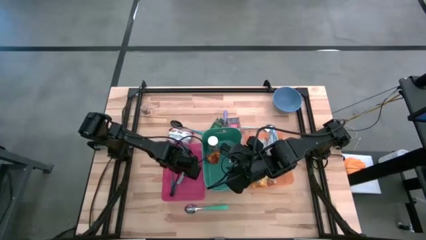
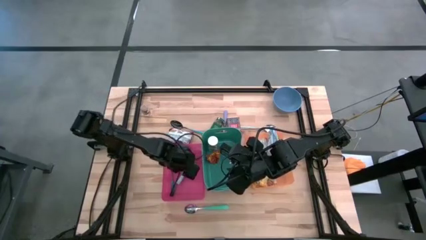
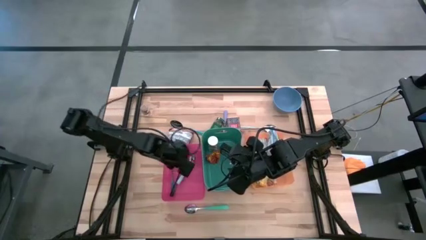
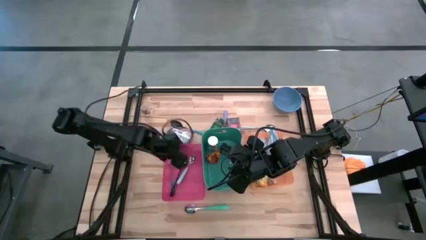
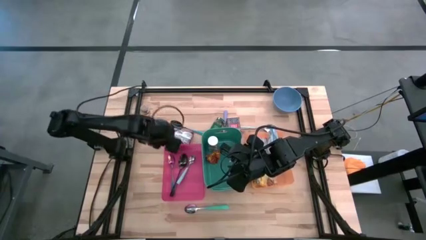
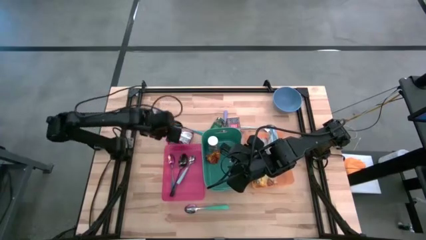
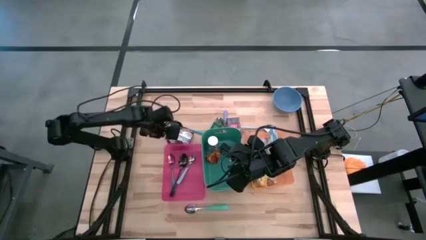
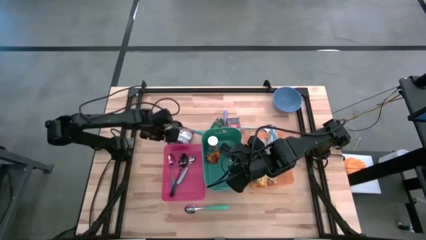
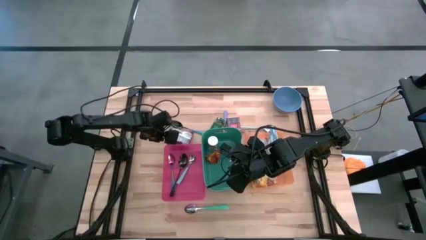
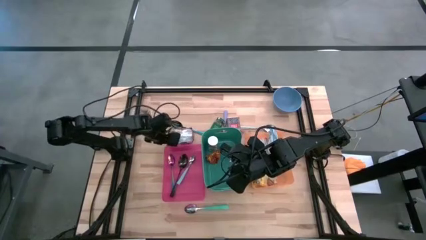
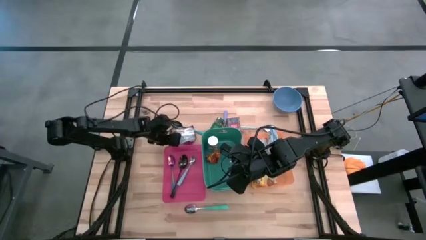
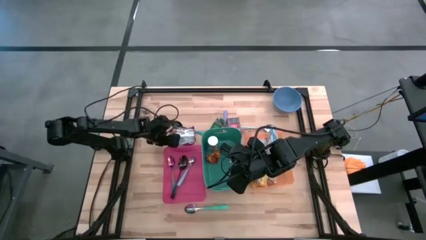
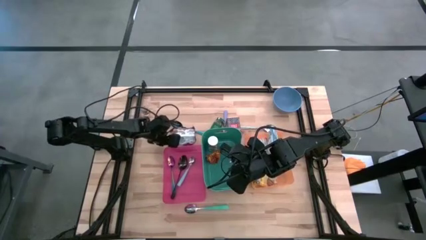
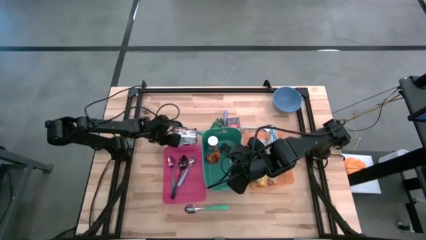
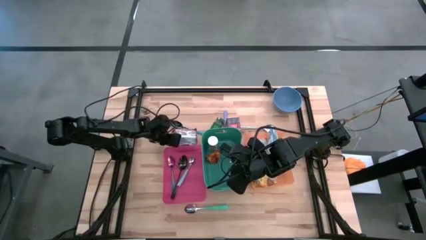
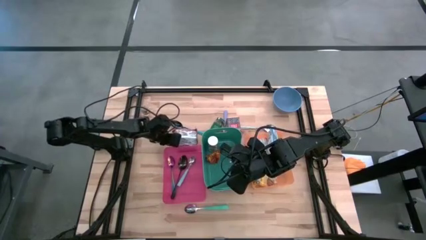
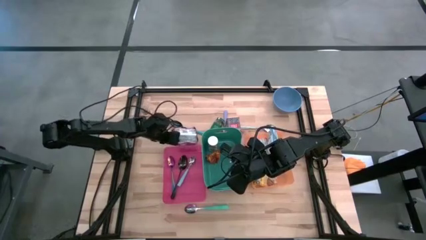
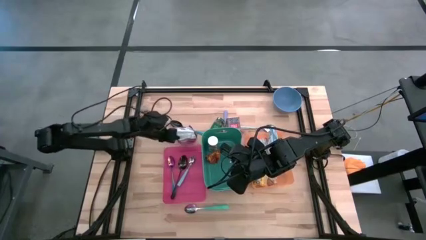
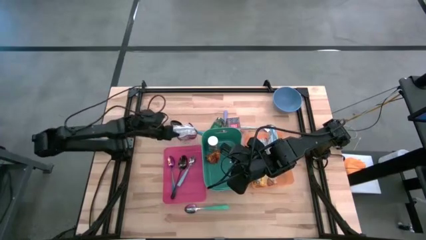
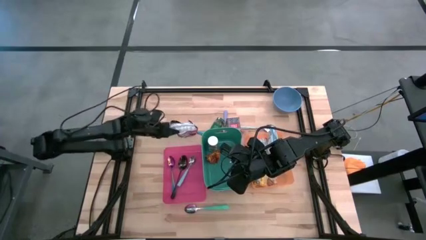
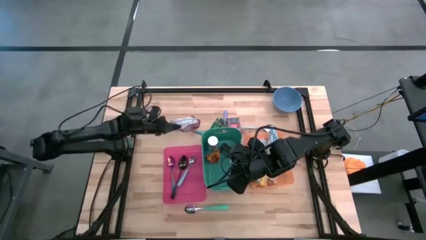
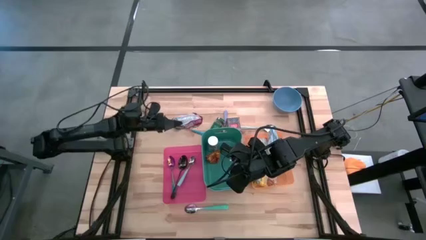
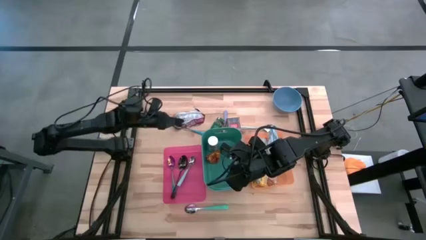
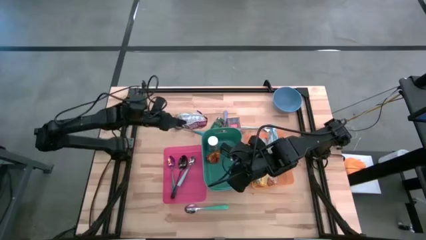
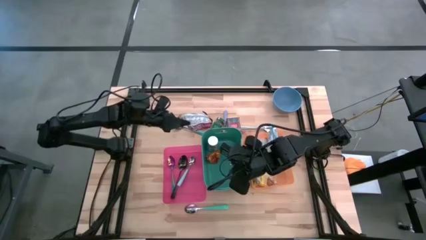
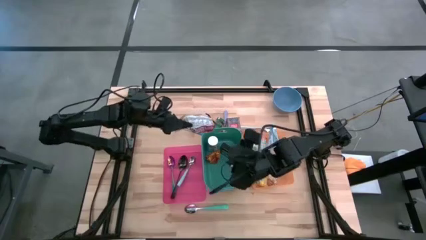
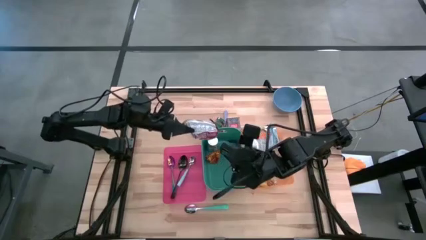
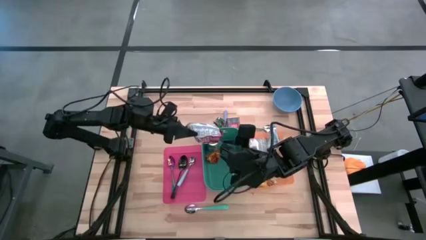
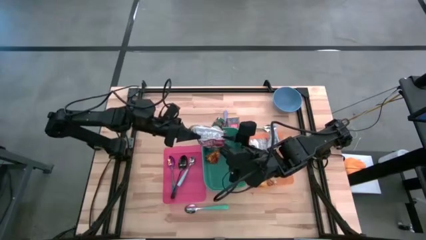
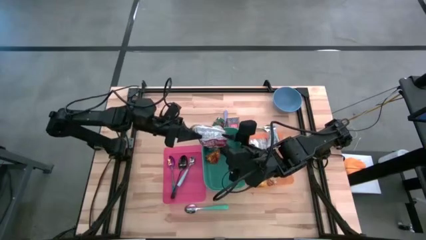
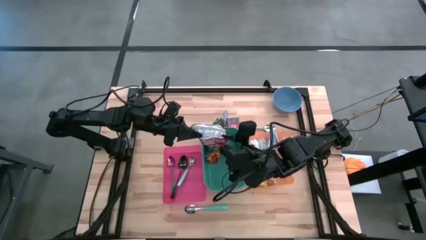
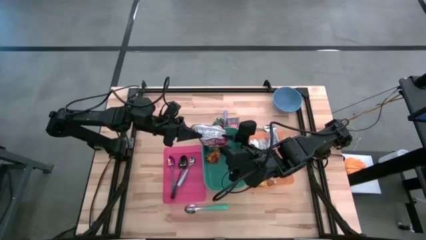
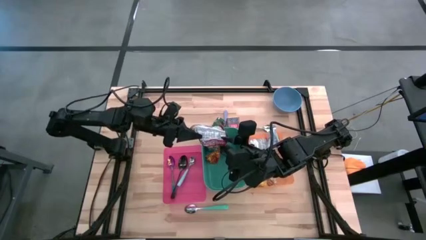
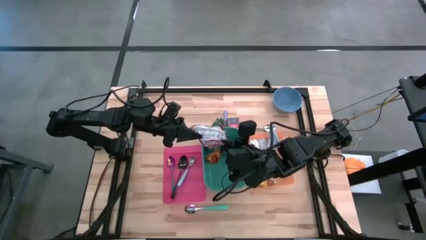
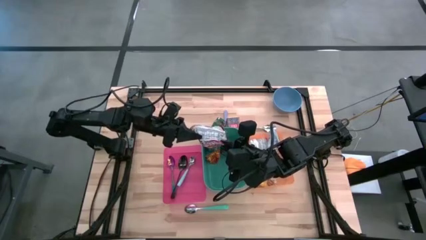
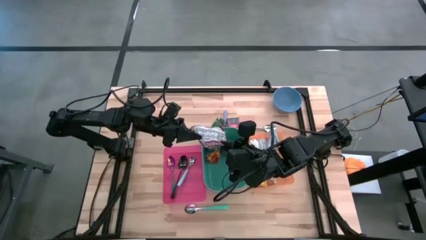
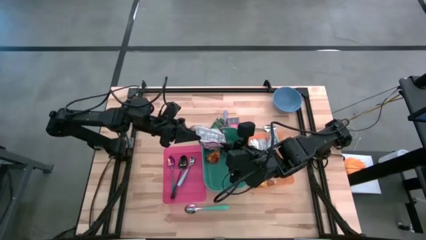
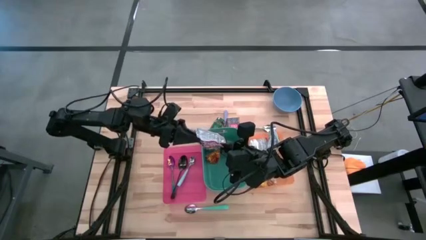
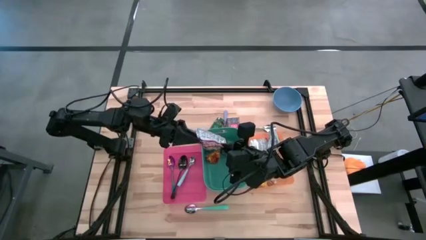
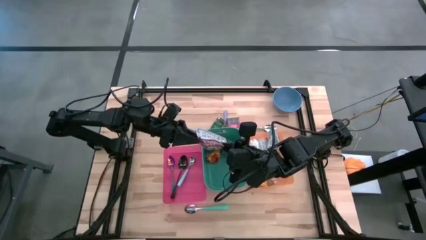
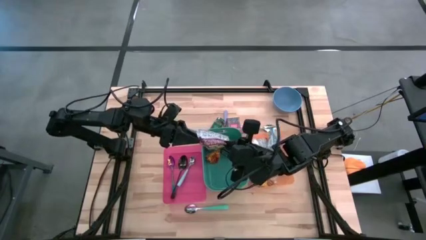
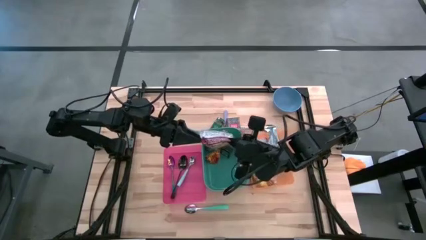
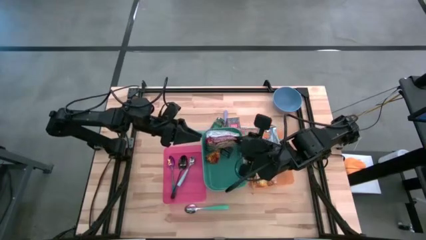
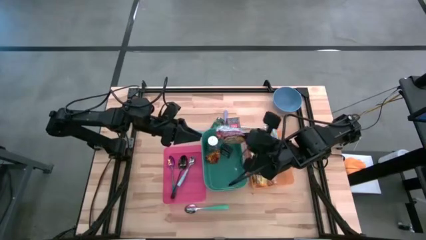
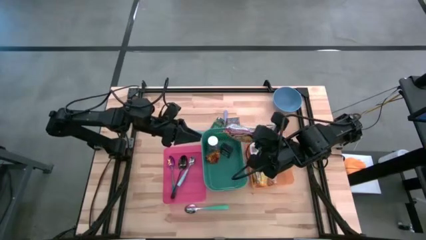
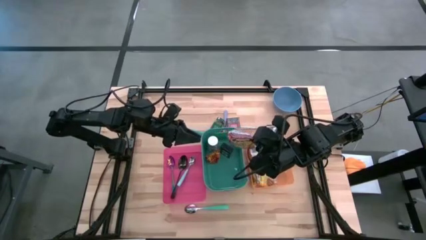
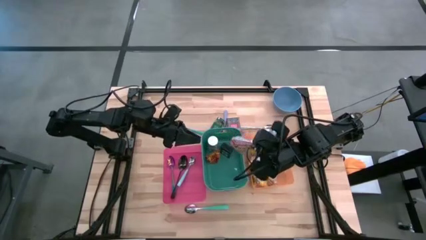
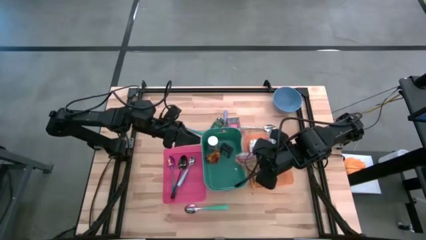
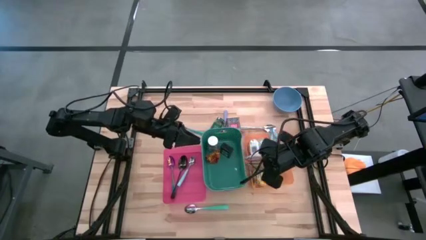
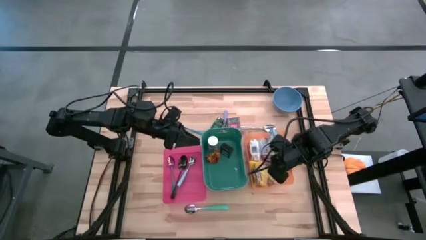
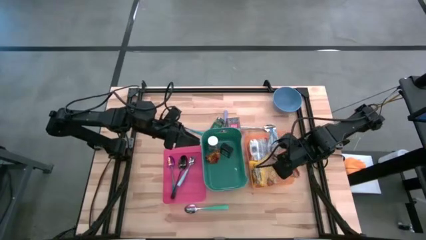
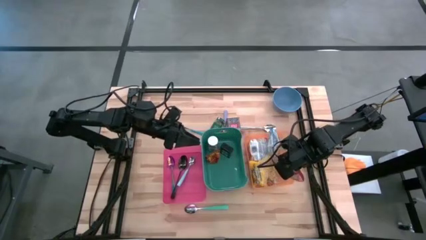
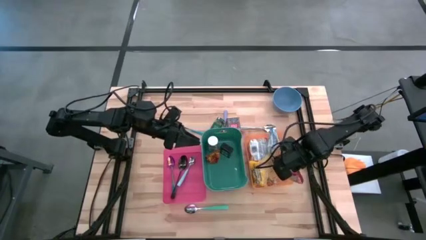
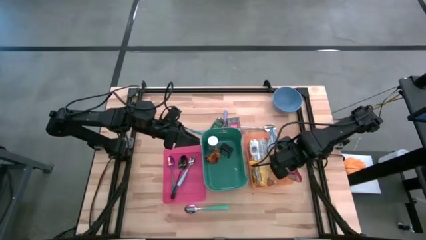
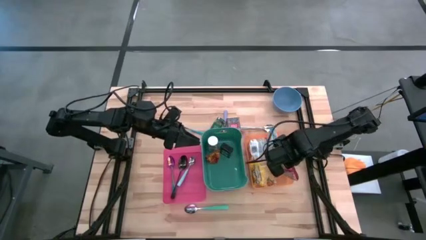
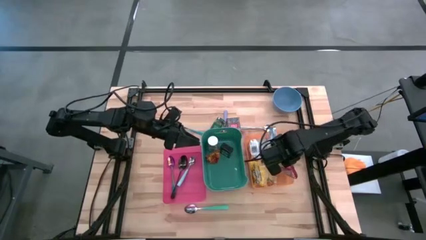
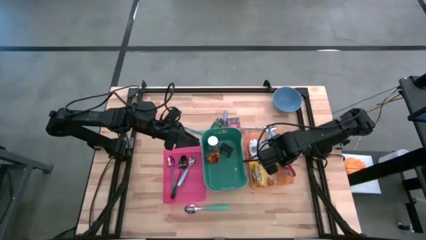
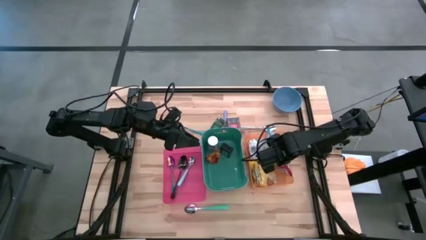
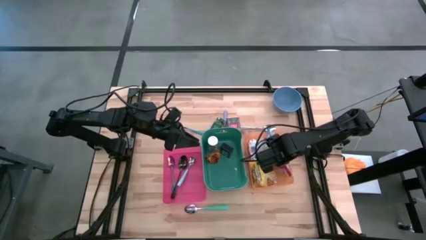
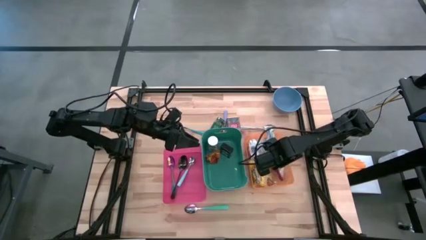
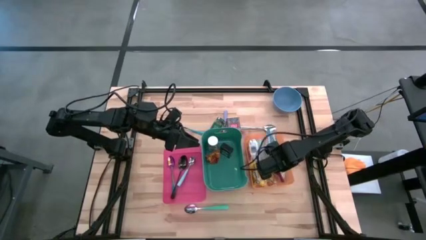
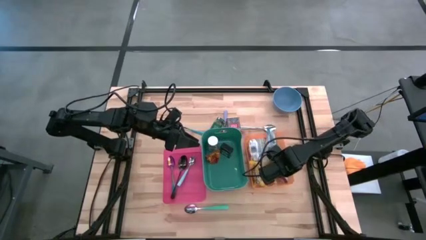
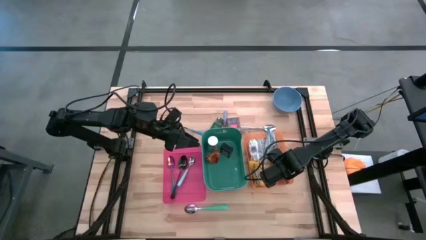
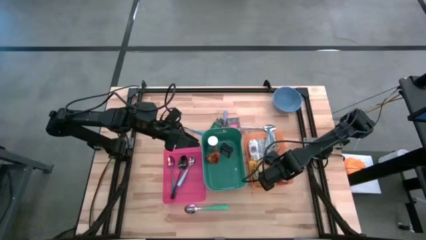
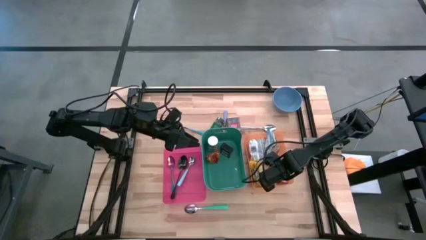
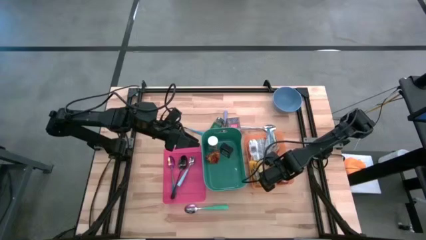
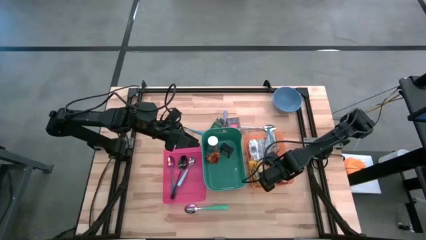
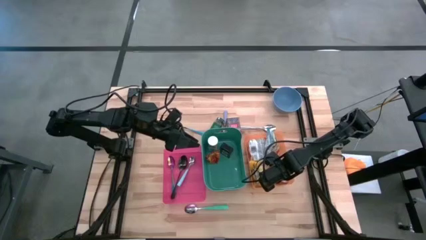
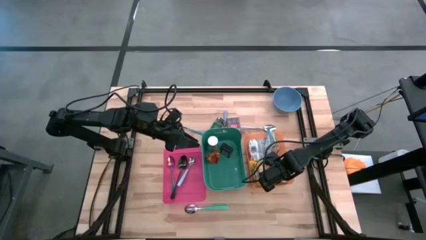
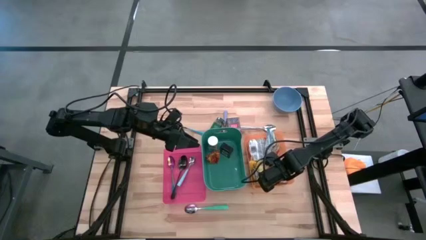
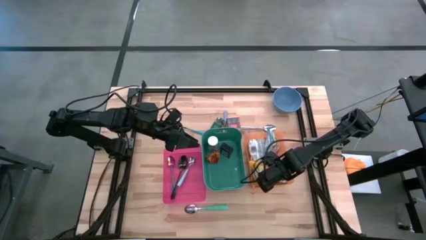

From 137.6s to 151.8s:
Put the red noodle pack into the orange bin
